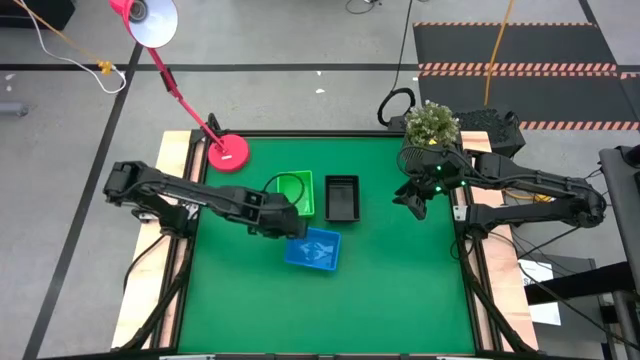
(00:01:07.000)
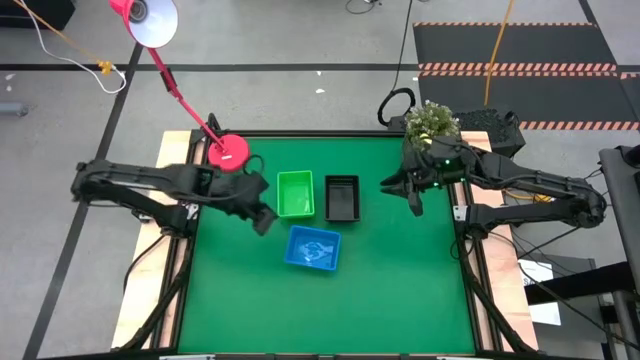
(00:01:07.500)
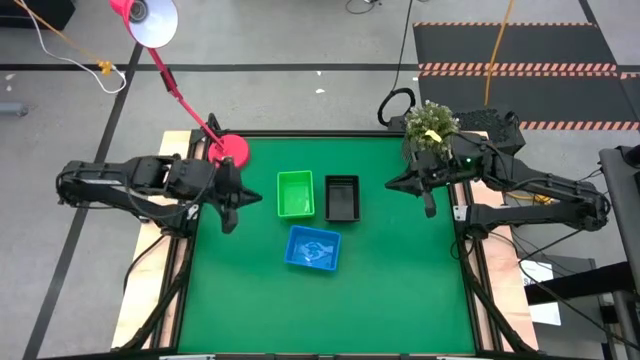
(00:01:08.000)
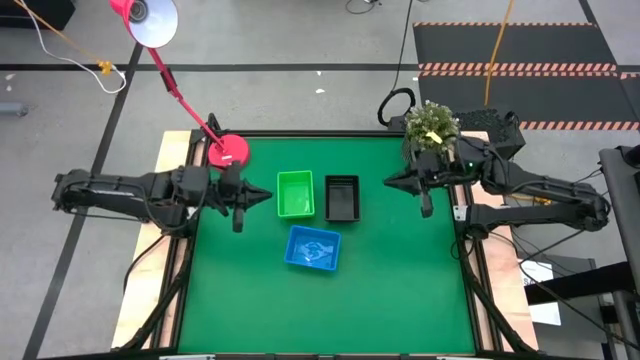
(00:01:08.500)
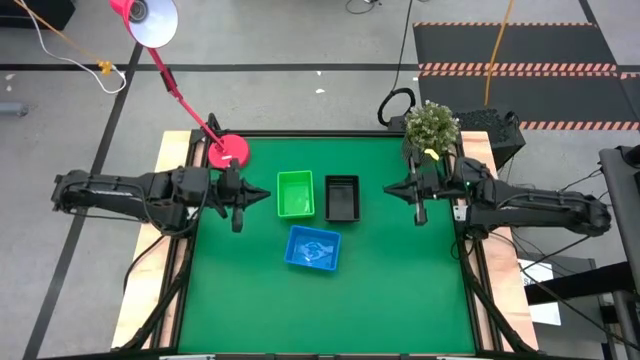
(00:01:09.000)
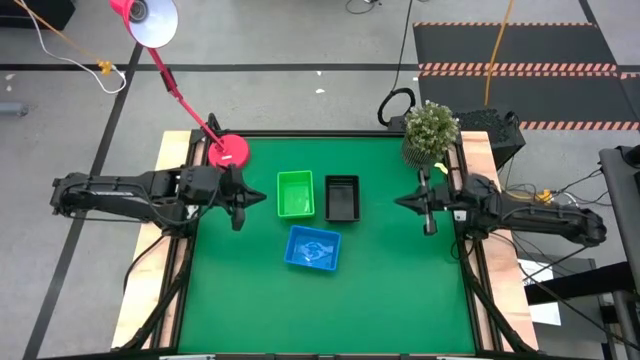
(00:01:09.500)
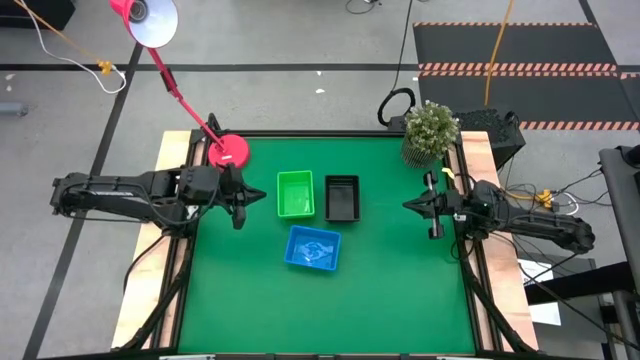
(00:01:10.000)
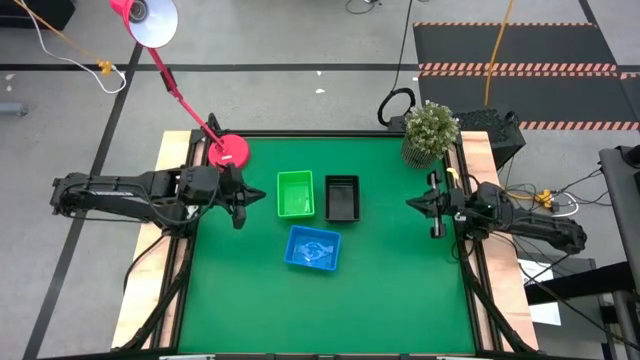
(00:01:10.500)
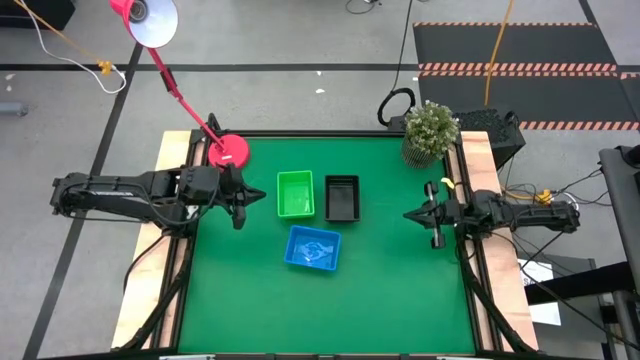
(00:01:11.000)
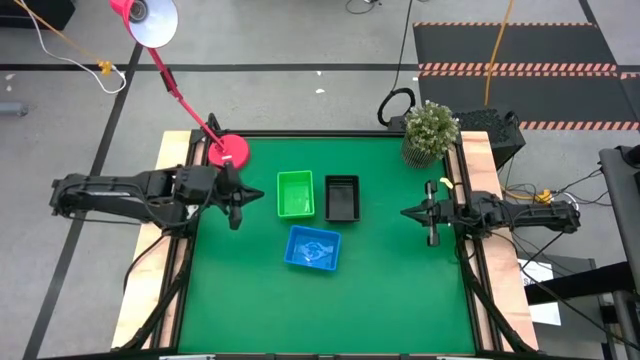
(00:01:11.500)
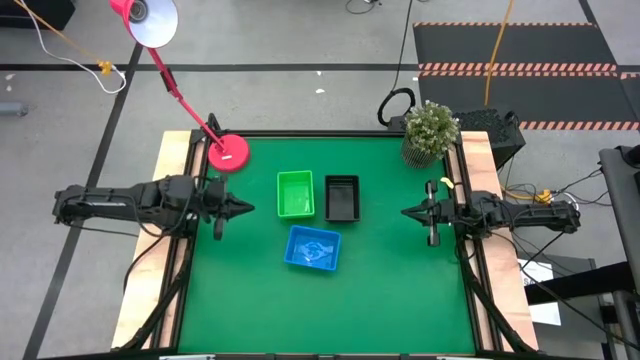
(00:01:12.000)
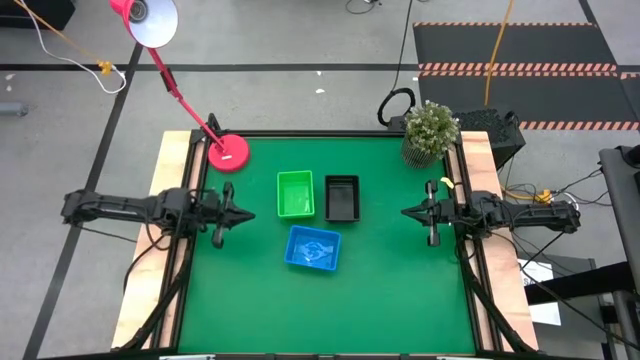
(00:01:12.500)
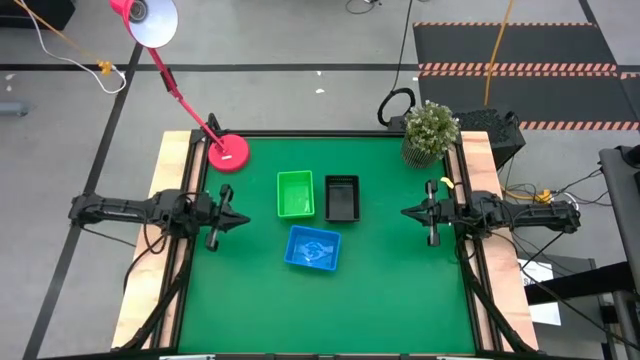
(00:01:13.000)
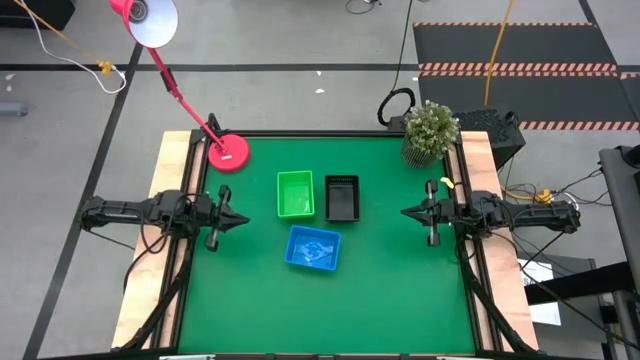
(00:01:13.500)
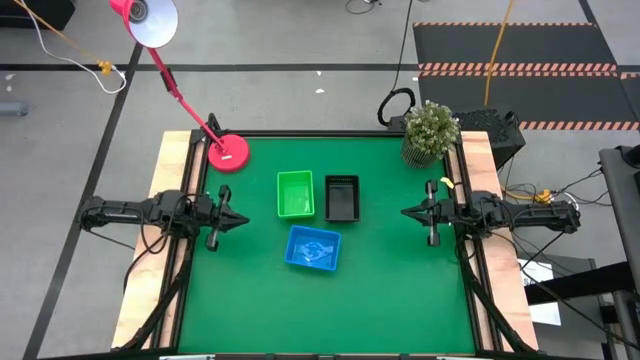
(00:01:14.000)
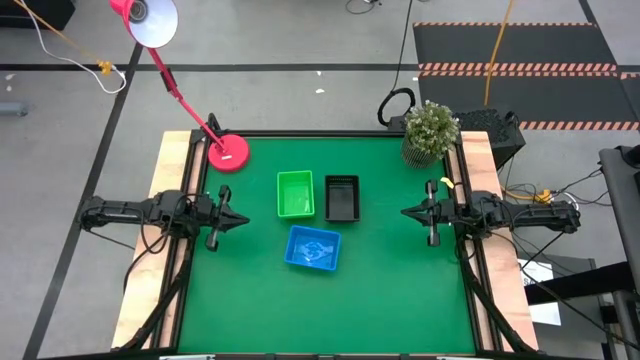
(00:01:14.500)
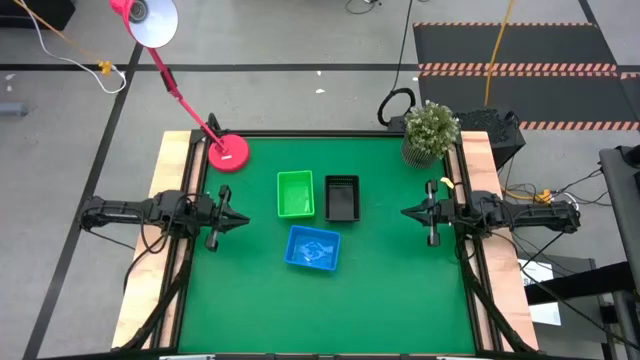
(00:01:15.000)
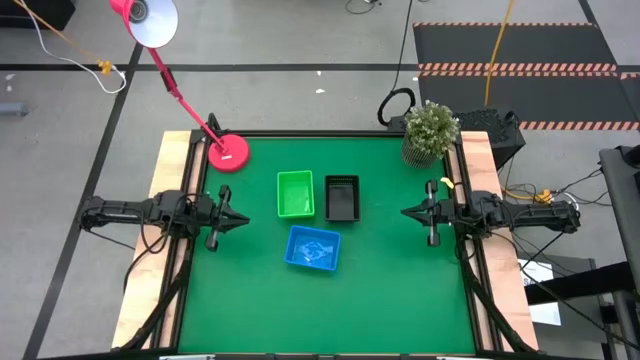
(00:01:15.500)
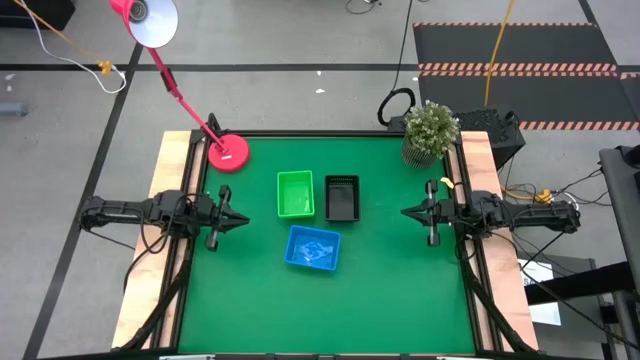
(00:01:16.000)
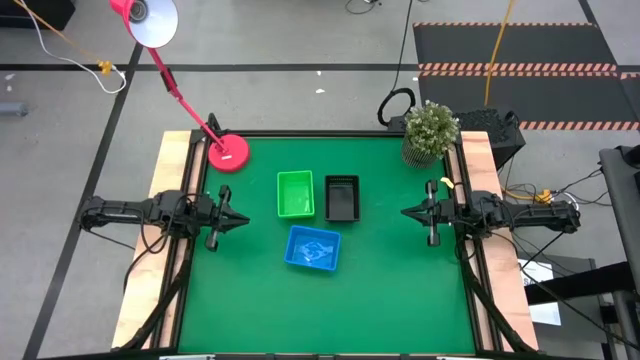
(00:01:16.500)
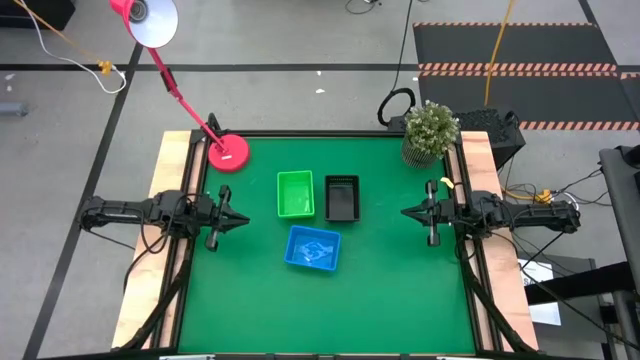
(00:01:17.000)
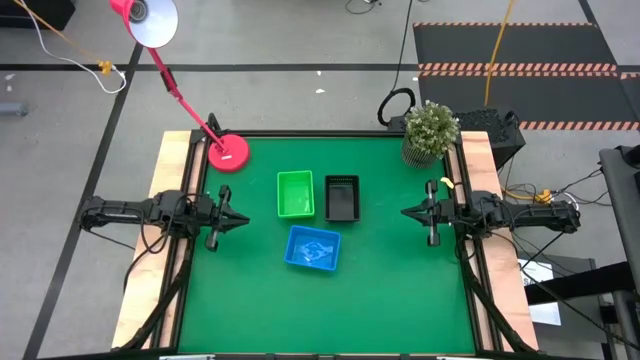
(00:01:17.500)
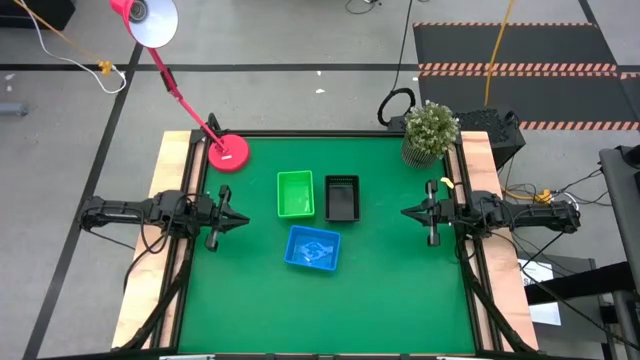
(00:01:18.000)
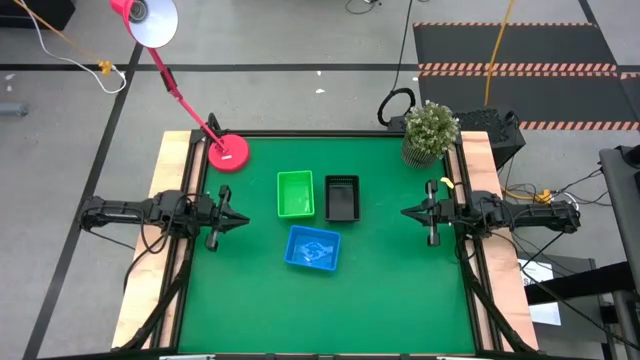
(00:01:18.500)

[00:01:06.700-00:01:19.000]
Return to Home Position

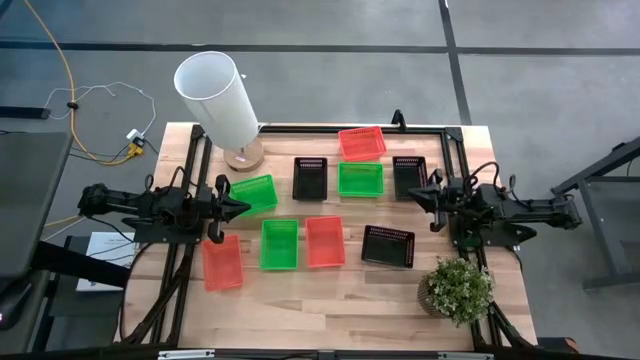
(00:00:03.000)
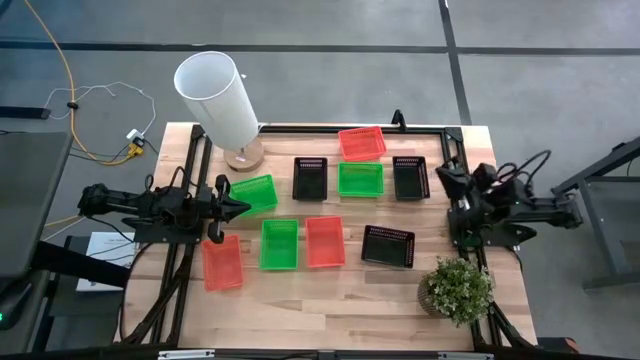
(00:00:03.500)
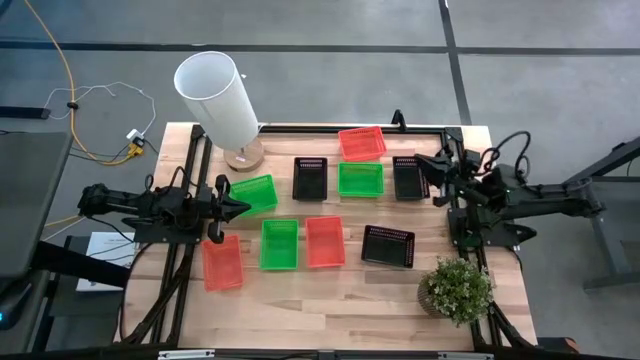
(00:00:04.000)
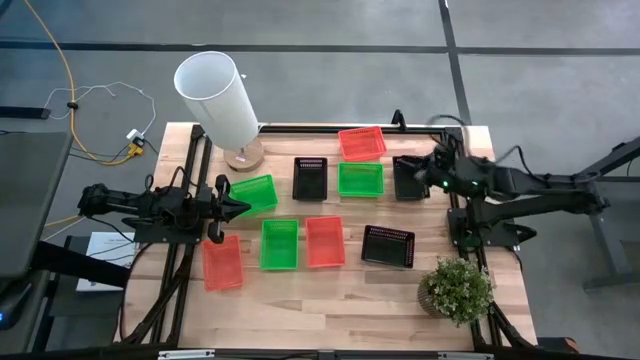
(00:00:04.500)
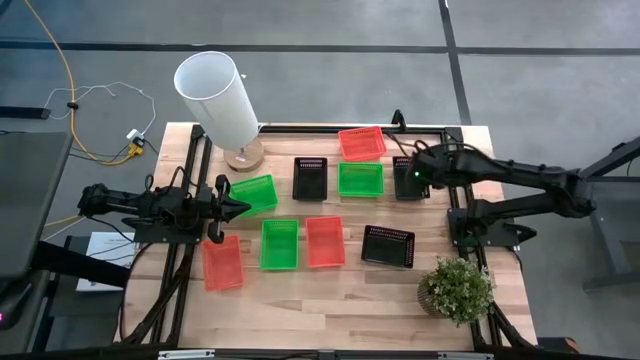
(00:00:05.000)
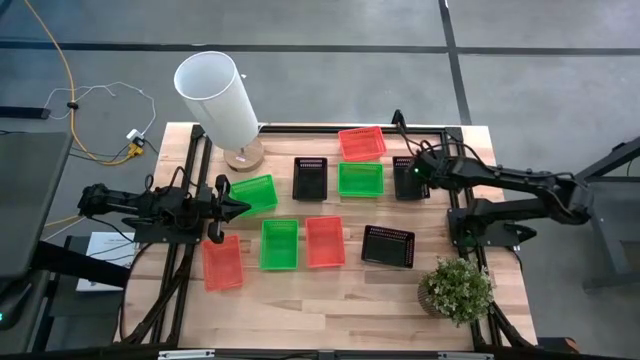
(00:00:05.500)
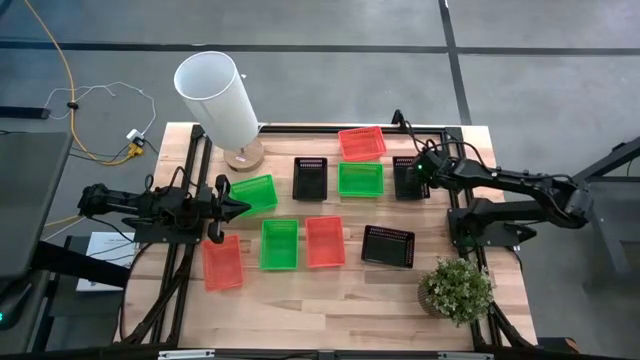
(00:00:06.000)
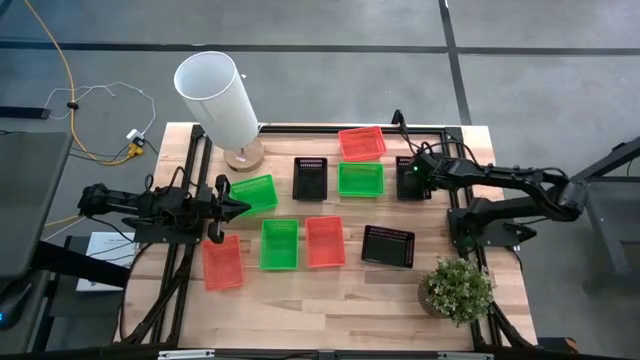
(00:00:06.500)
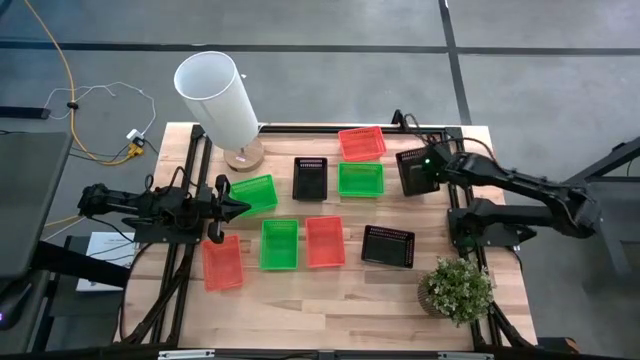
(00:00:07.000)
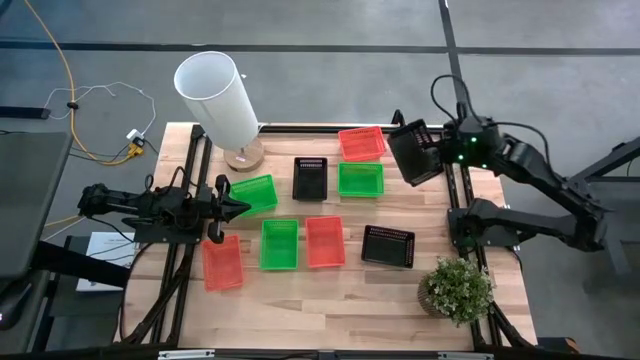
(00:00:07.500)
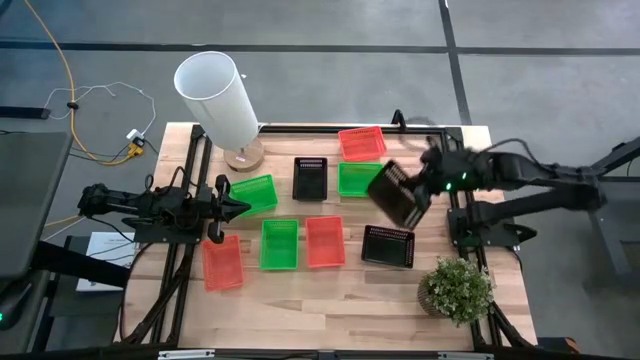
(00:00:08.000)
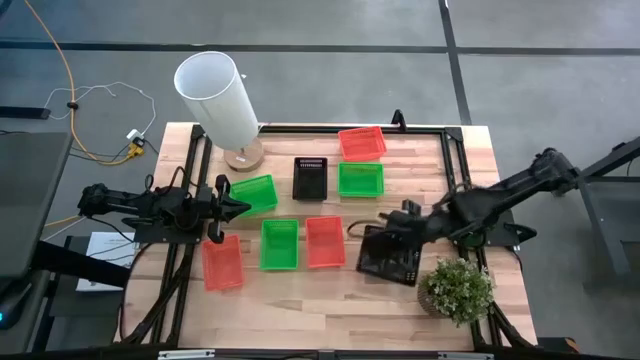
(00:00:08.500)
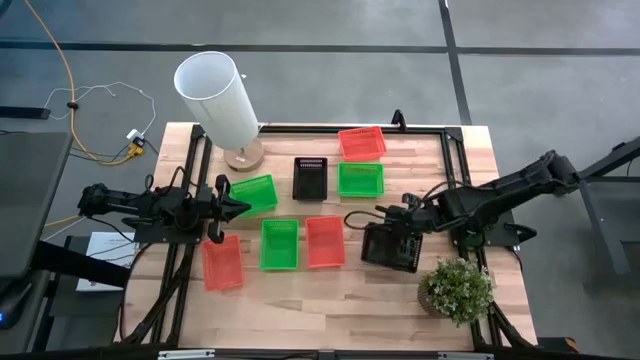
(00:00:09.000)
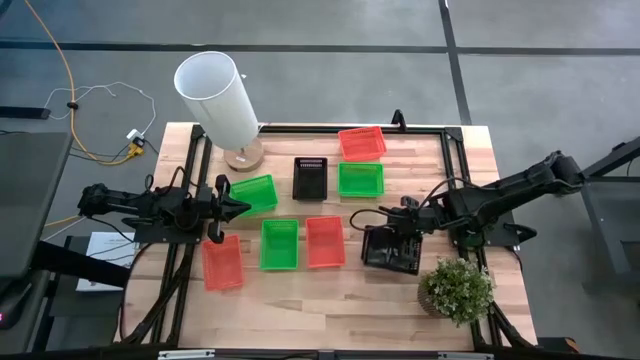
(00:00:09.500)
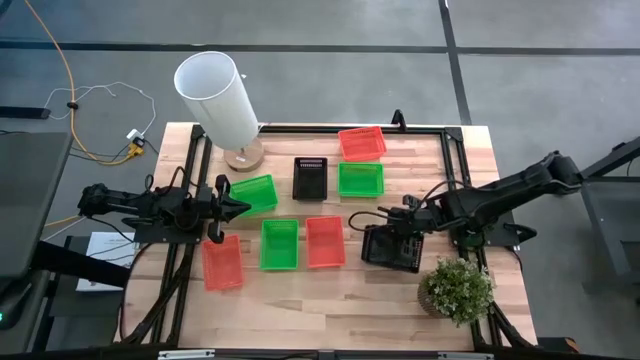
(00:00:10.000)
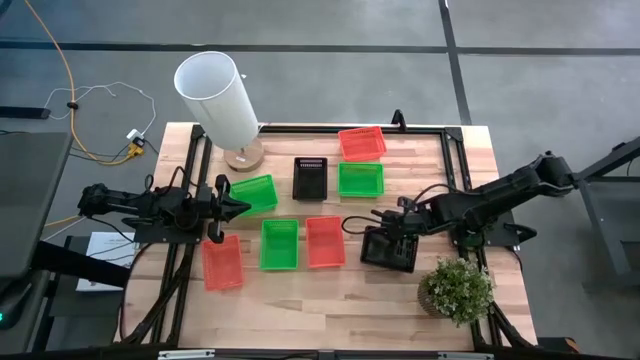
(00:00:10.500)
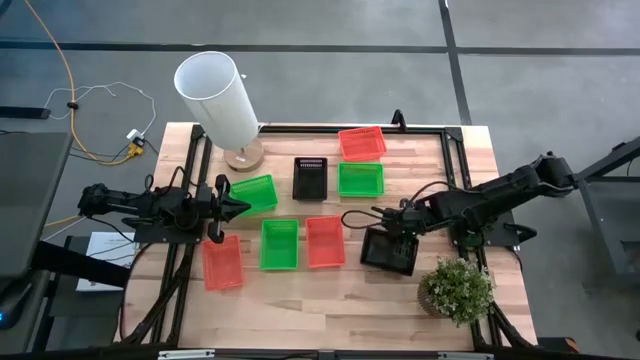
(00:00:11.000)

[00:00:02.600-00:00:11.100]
Stack the top right black bin on the bottom black bin
